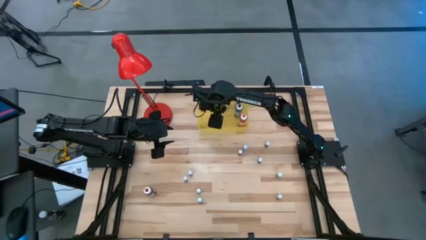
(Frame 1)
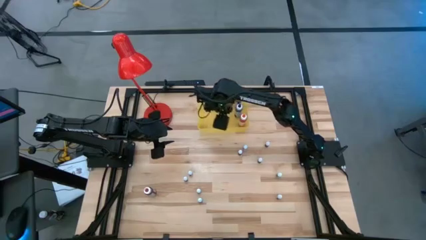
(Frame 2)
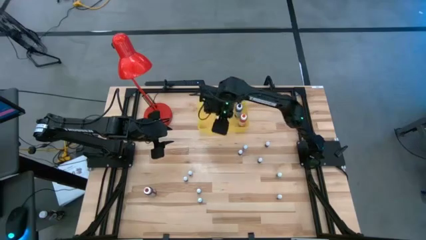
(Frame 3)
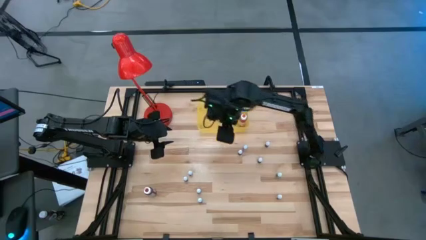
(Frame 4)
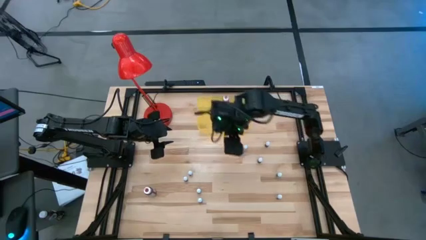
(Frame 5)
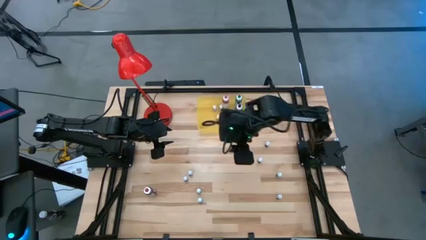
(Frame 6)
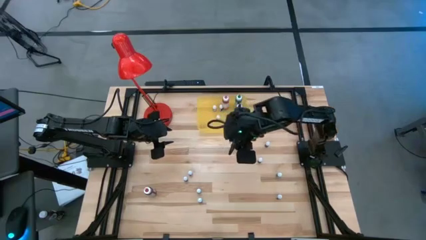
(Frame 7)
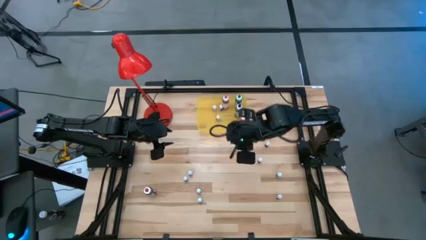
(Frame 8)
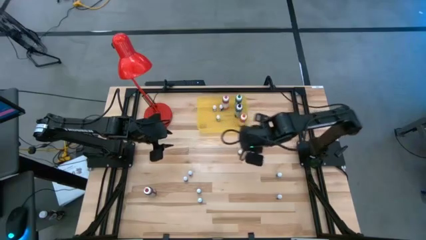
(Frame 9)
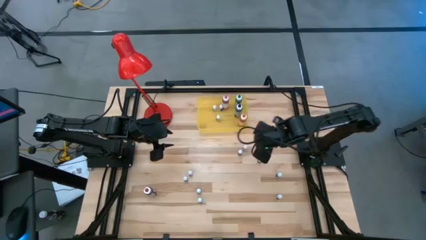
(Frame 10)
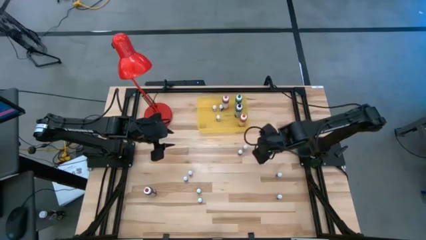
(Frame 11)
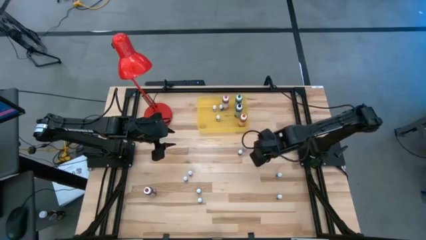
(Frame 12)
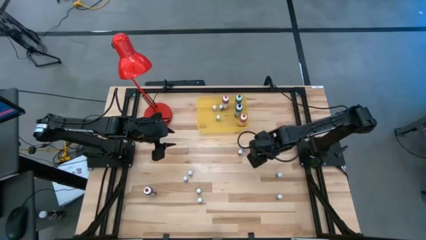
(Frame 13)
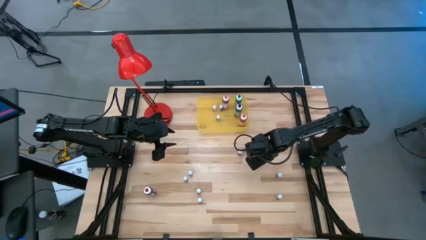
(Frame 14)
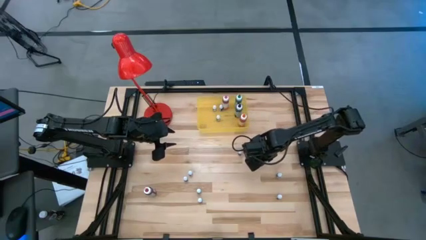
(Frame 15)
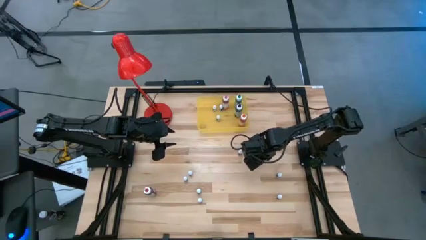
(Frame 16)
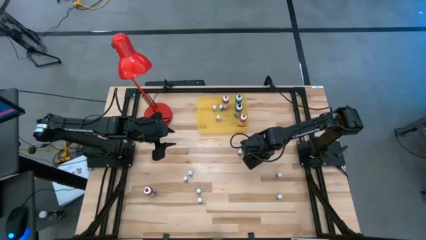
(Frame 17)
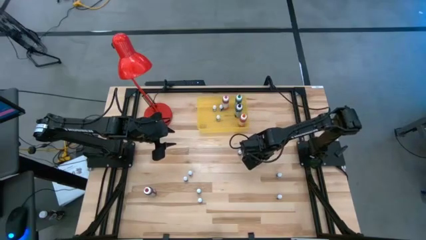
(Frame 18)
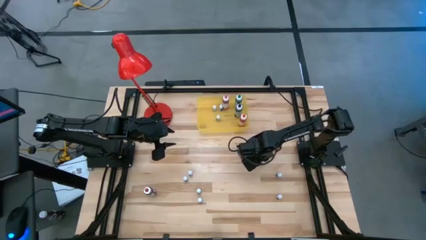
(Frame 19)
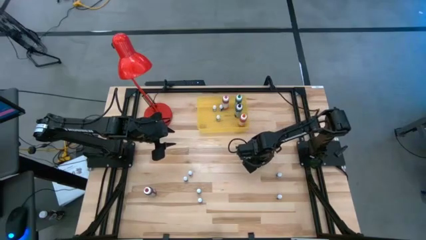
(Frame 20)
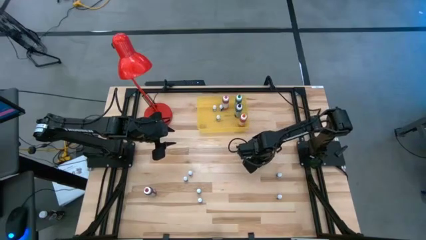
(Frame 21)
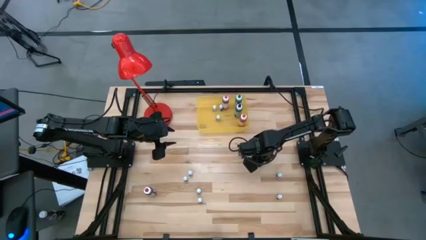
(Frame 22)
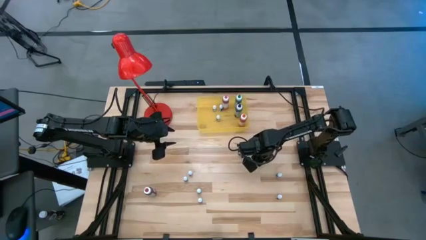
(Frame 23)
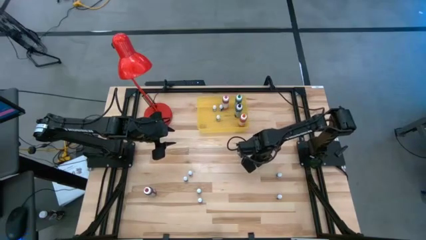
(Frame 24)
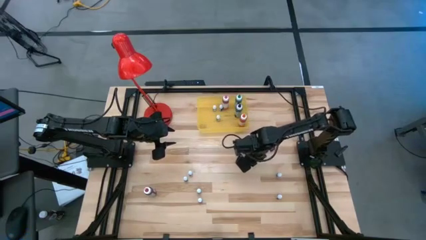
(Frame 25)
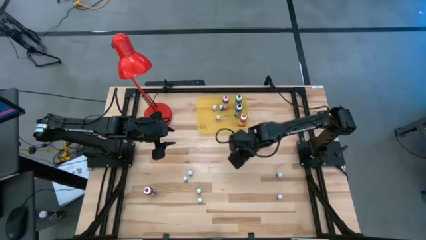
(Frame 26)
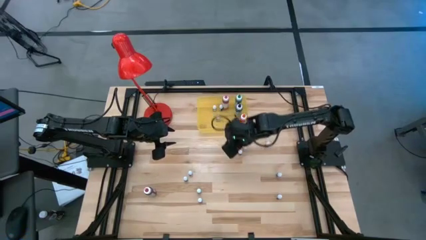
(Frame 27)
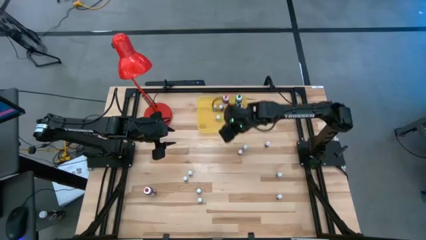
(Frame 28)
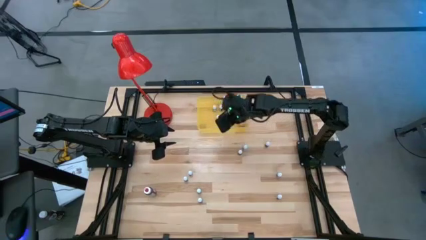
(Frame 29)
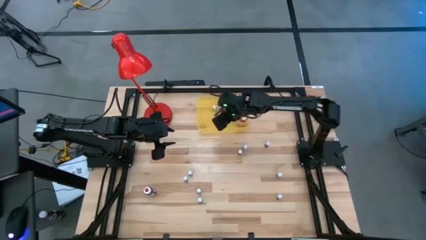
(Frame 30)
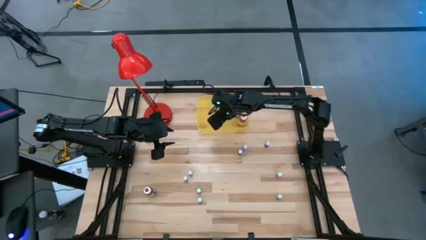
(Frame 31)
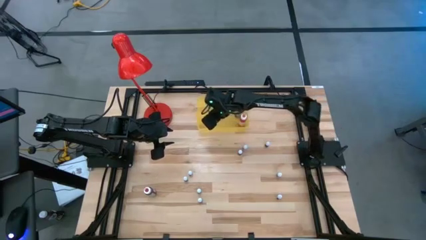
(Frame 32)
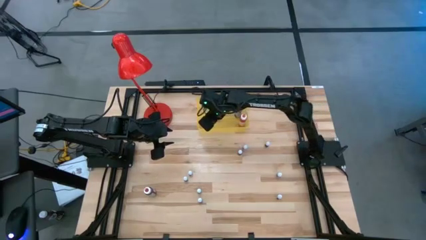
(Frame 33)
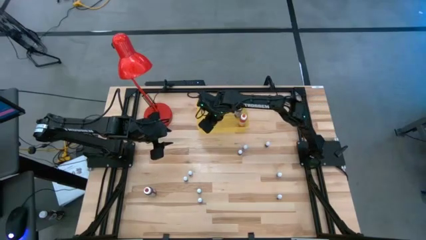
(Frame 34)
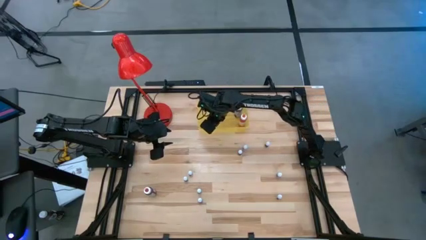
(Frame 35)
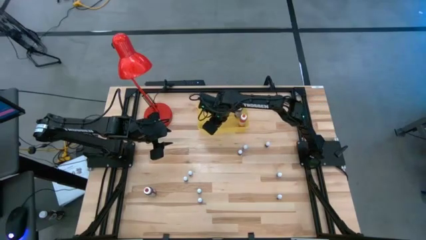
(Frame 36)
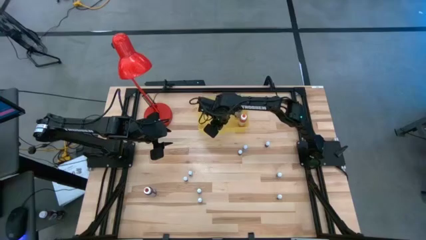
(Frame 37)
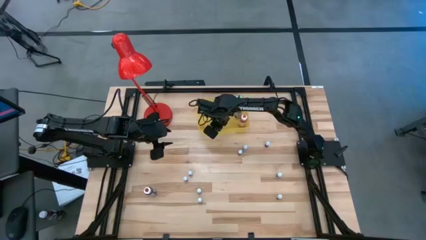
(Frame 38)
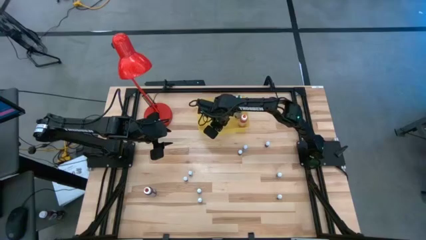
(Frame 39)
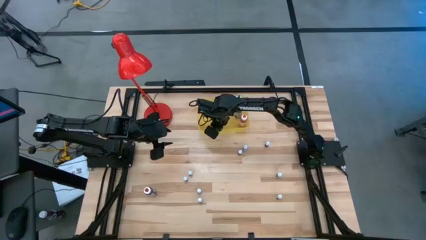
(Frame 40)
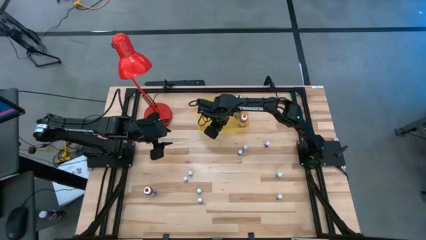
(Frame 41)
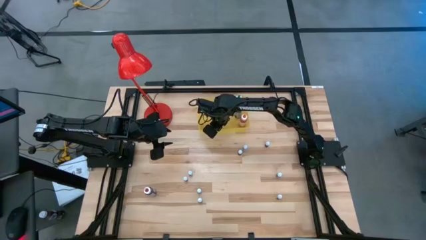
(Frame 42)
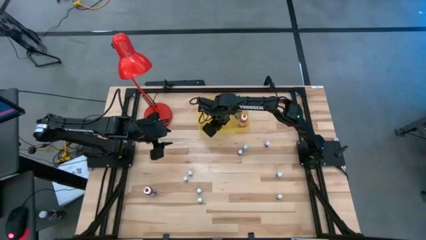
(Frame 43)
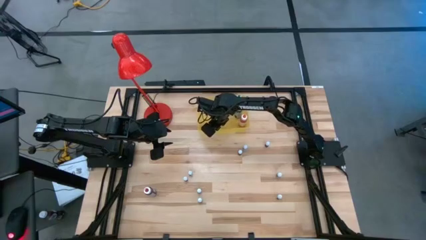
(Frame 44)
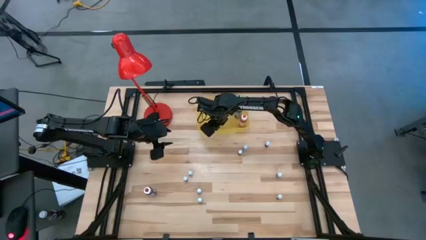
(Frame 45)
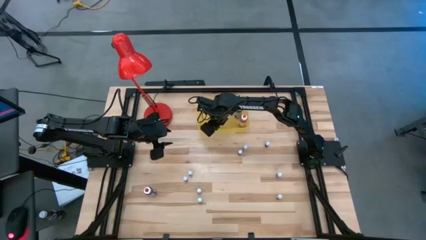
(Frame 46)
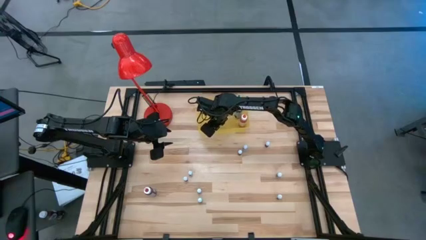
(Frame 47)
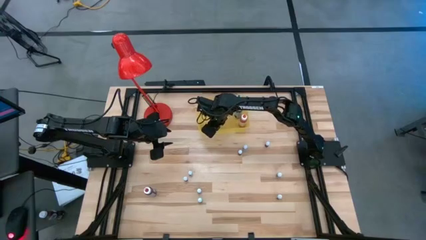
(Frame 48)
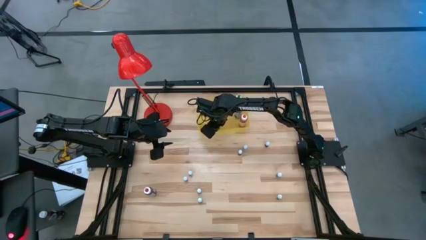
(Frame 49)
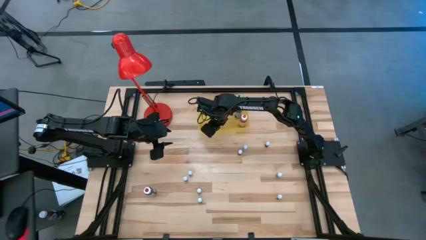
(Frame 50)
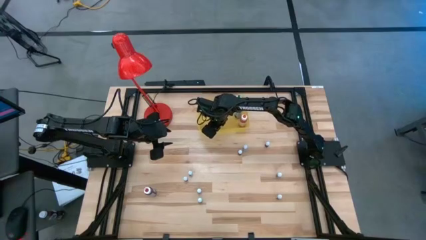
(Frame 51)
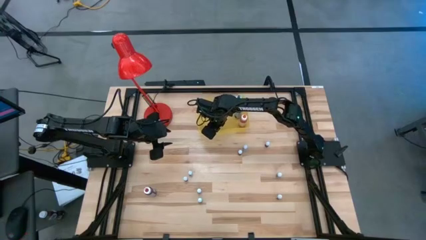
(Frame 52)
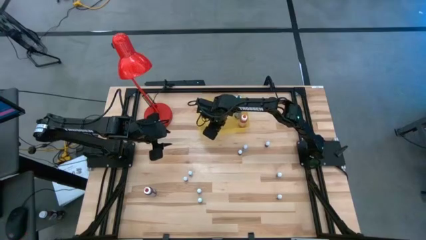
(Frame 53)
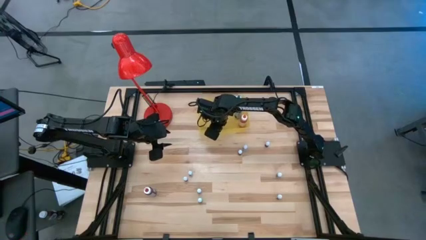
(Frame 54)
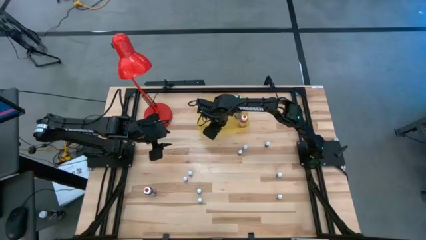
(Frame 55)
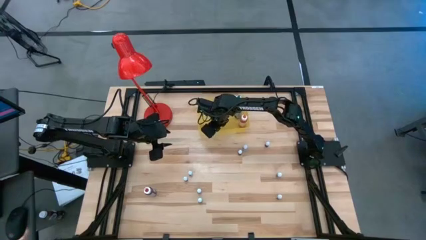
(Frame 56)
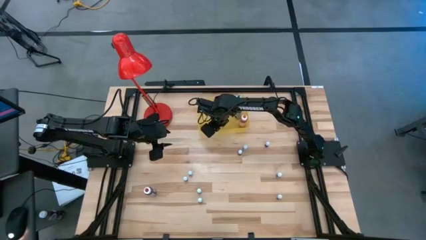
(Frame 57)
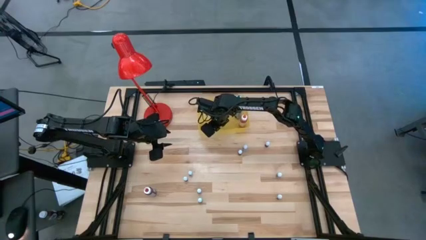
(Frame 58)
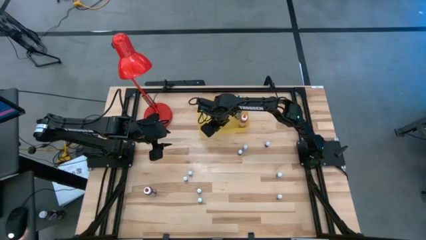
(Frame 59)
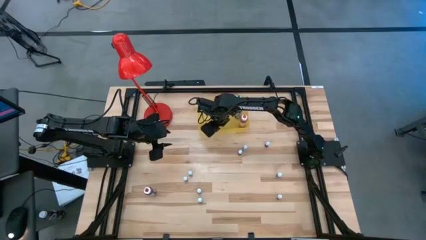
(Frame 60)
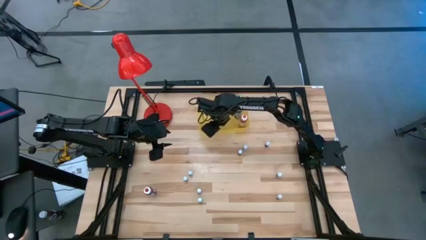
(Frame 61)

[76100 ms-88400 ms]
Task: Pick & Place food coloring
Put the small black food coloring bottle into the yellow bin
